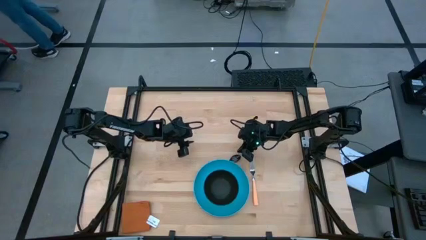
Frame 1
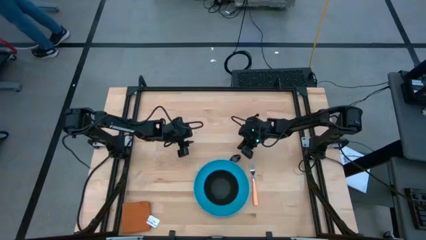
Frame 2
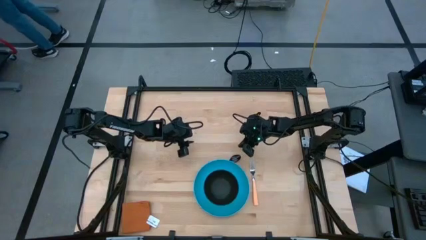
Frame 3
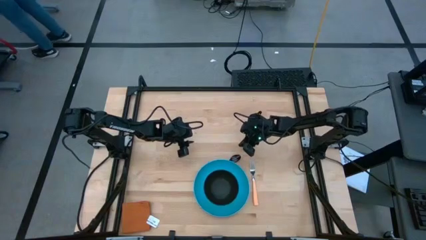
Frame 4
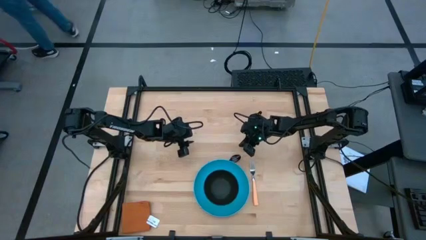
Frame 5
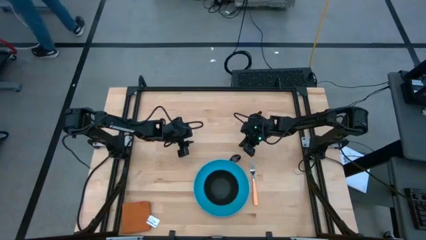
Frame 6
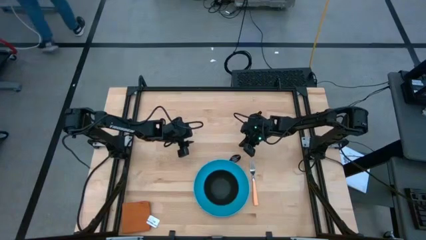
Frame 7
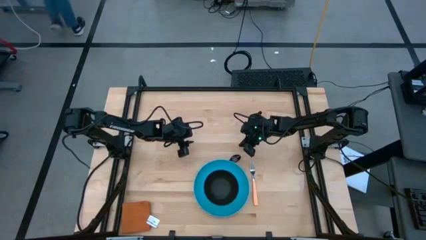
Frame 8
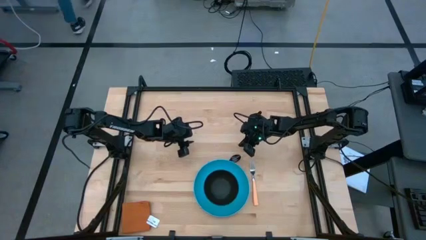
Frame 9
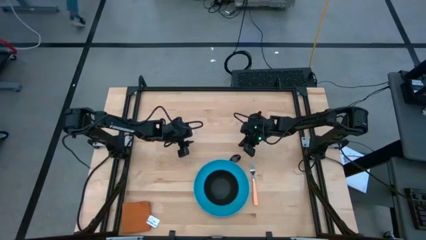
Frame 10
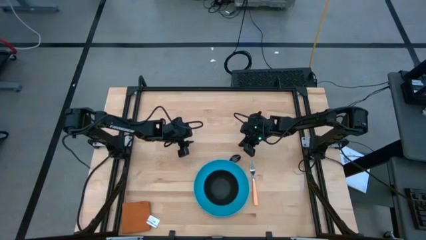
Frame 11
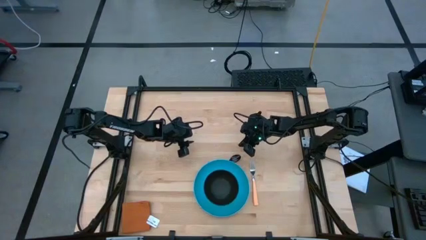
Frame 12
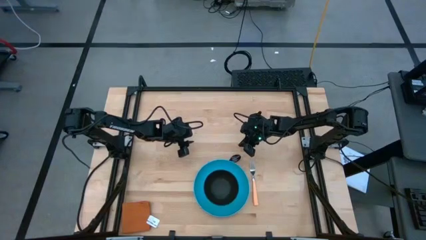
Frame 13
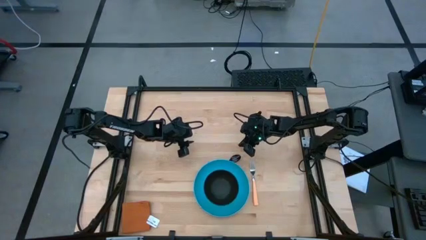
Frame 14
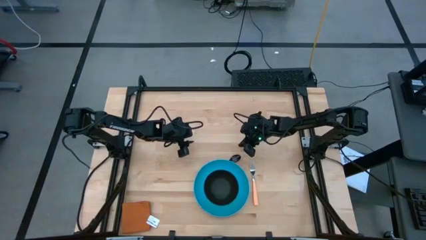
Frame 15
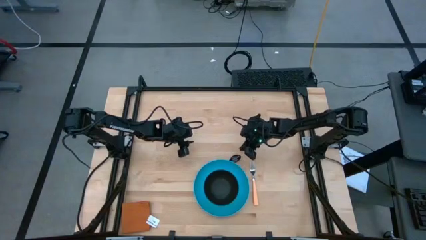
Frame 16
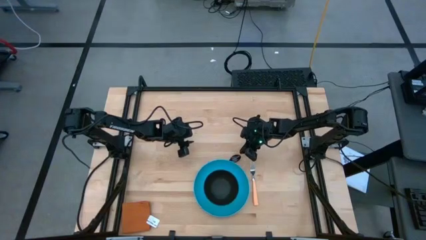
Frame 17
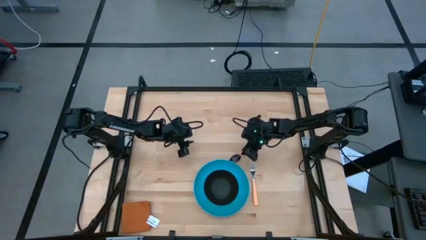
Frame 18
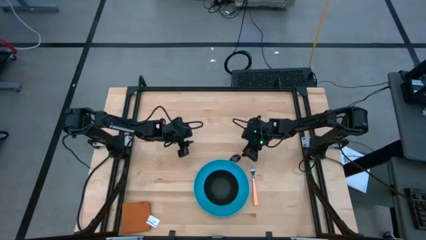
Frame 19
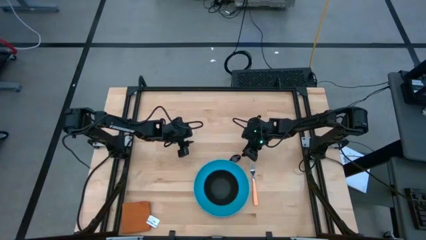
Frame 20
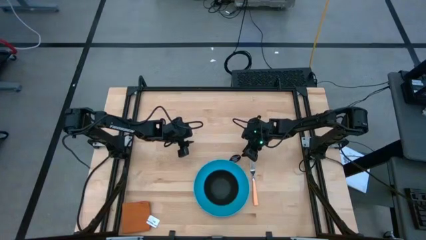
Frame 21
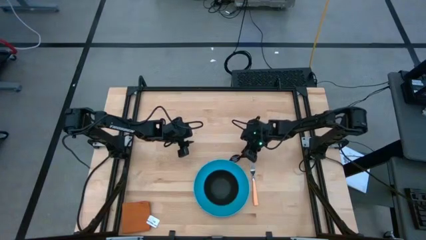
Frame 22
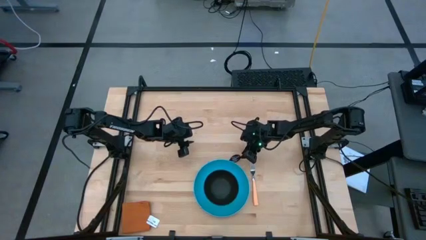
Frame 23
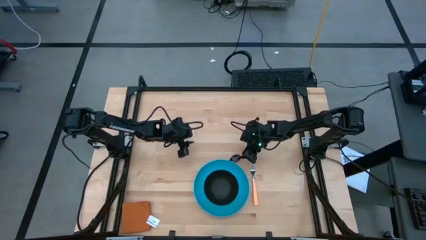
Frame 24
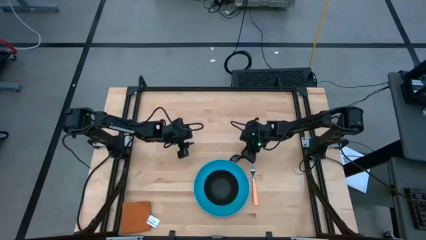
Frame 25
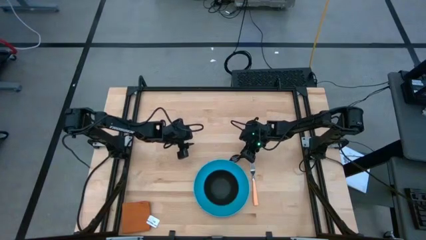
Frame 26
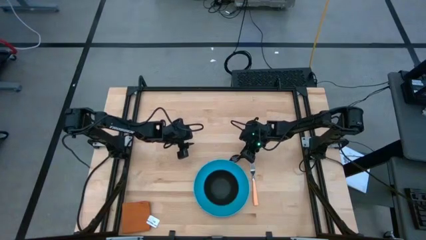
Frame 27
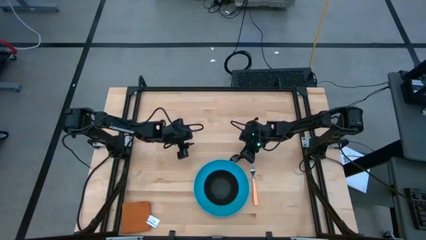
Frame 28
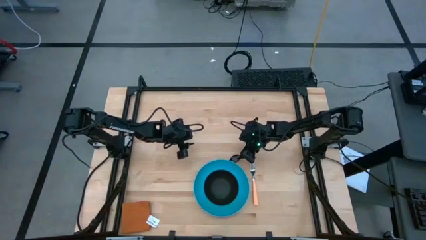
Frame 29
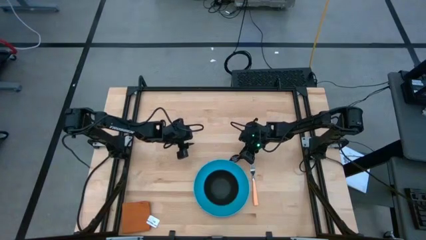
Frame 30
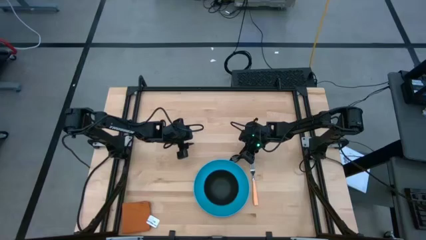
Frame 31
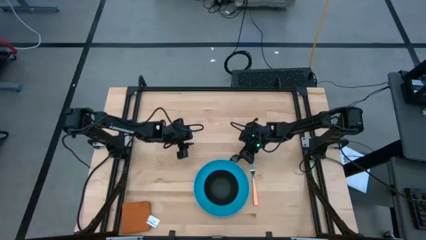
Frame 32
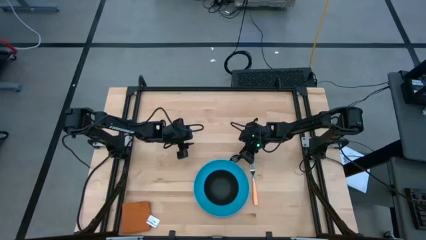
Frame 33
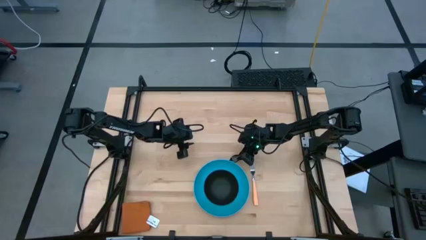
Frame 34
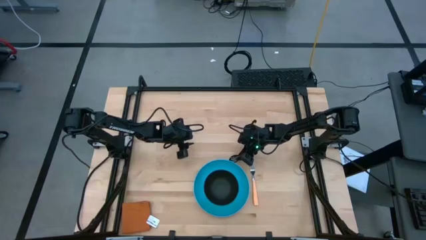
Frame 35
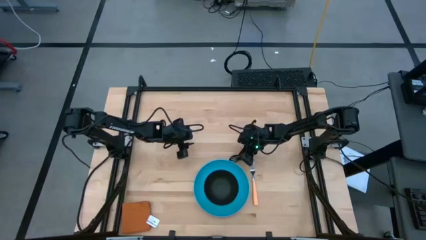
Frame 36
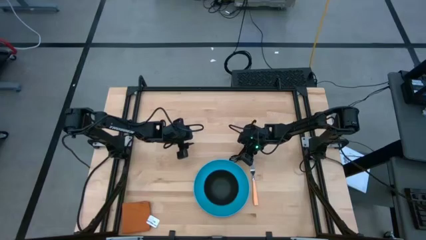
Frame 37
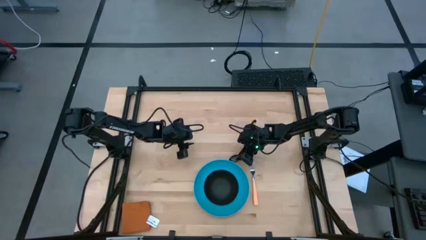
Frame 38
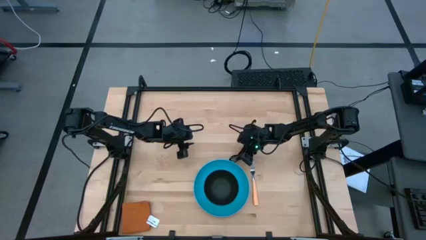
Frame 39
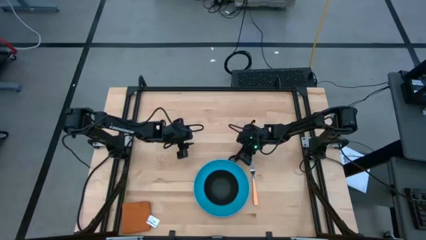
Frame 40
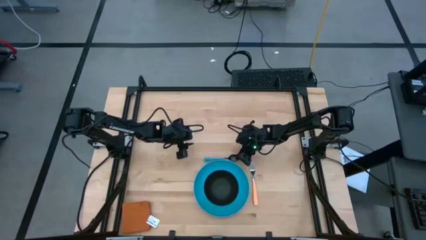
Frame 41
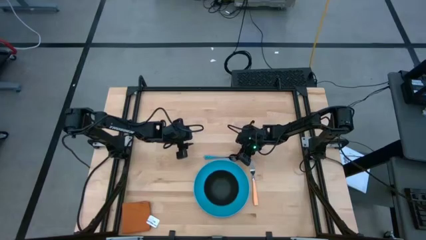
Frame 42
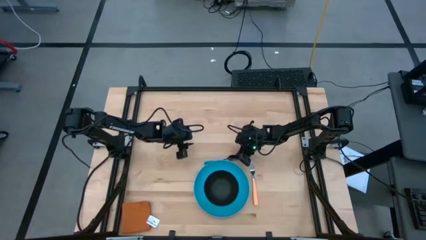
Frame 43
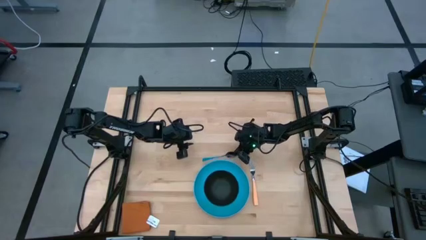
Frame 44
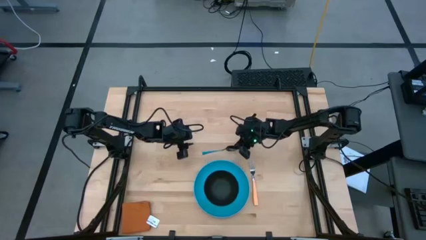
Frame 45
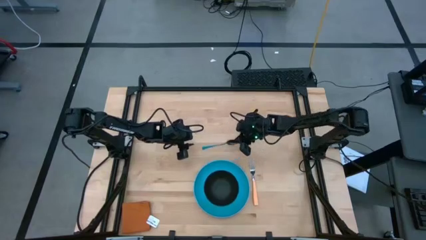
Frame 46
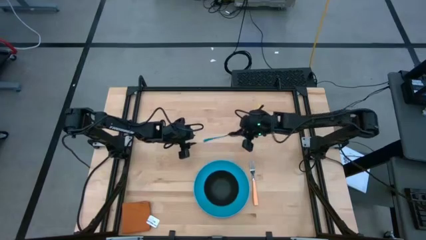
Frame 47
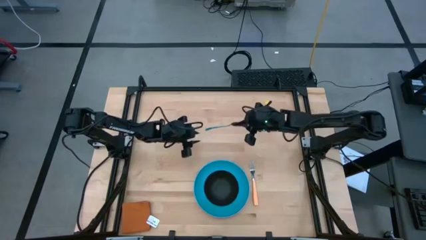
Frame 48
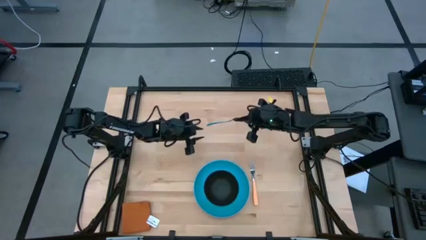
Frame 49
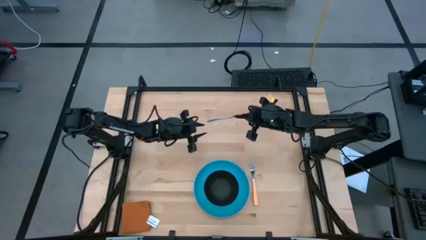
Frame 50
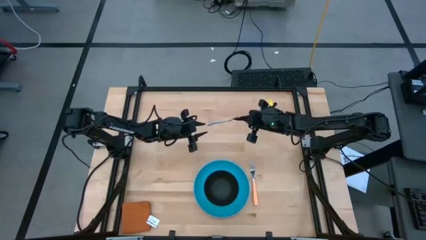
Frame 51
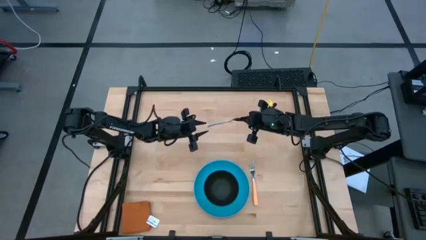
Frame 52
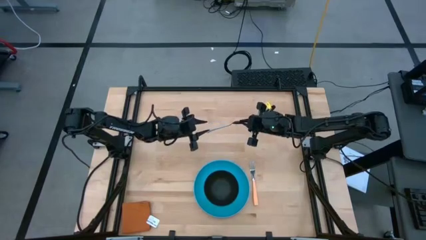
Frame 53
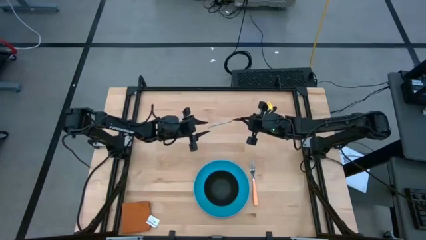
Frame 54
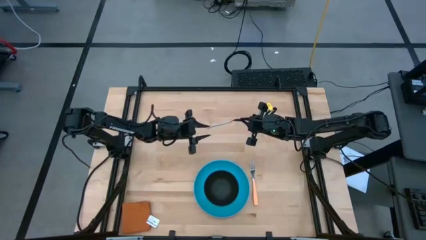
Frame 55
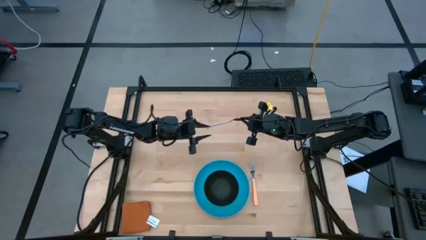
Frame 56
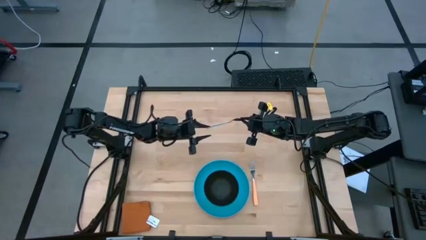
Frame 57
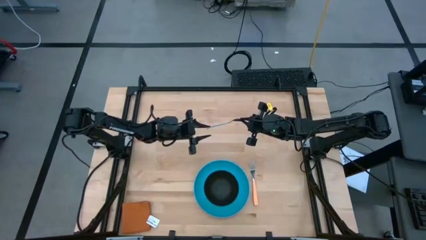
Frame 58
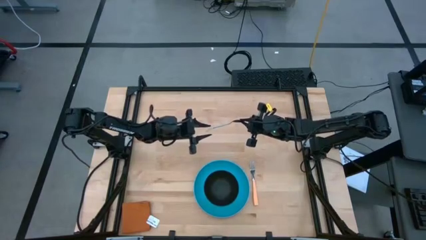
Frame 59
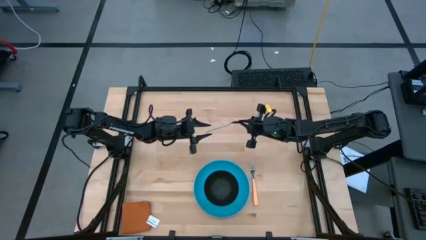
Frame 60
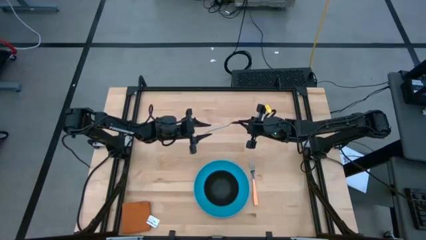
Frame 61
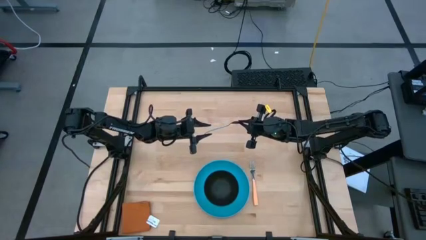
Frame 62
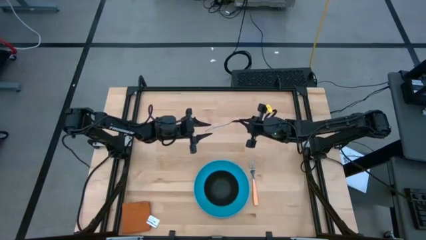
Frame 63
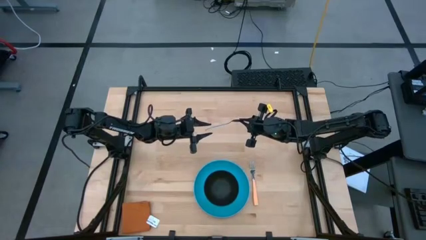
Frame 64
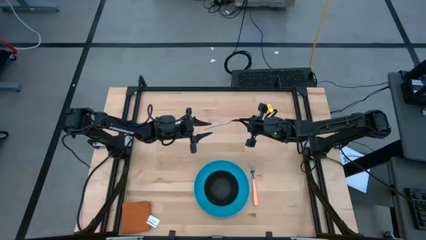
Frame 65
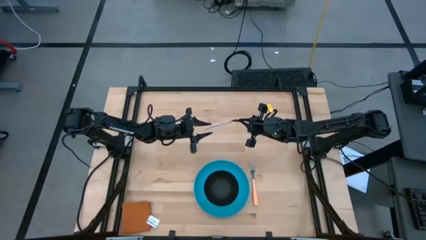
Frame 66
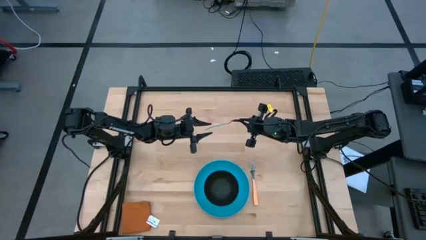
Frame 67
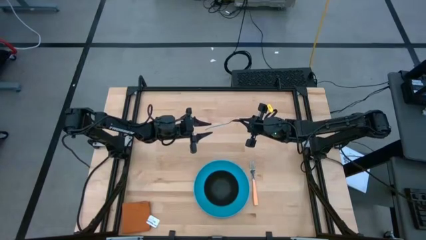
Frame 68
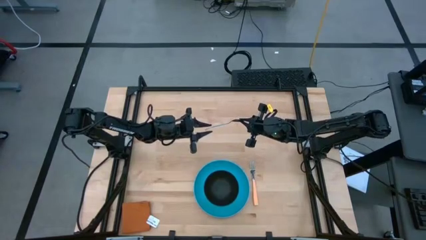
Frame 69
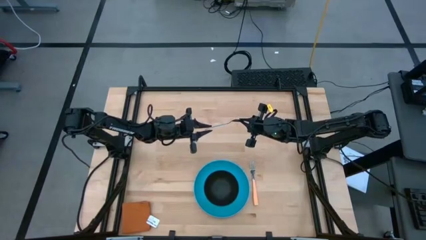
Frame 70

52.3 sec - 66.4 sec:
Task: Set table place
Put the blue spoon into the bowl
